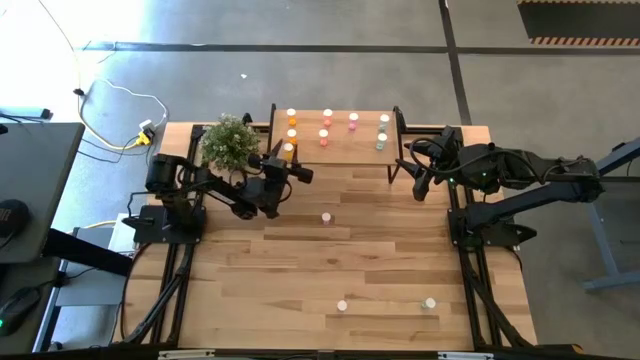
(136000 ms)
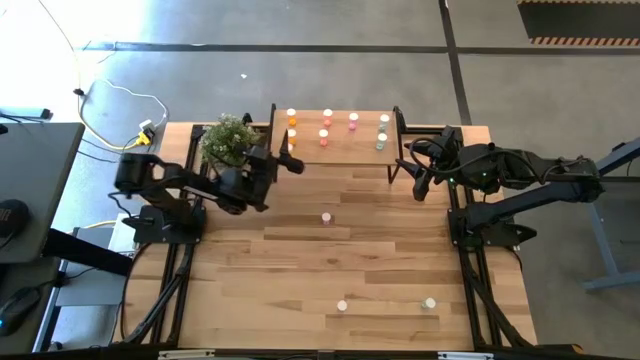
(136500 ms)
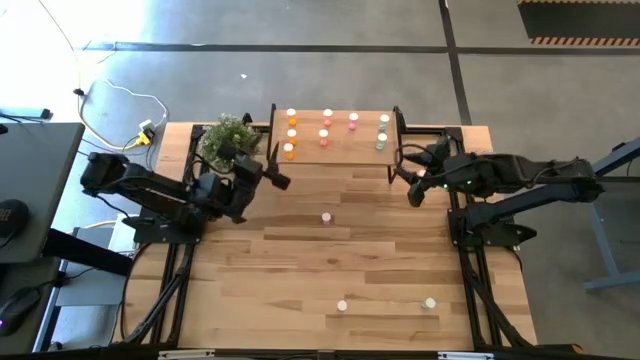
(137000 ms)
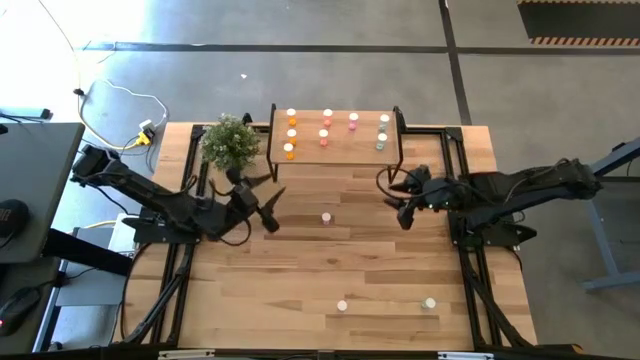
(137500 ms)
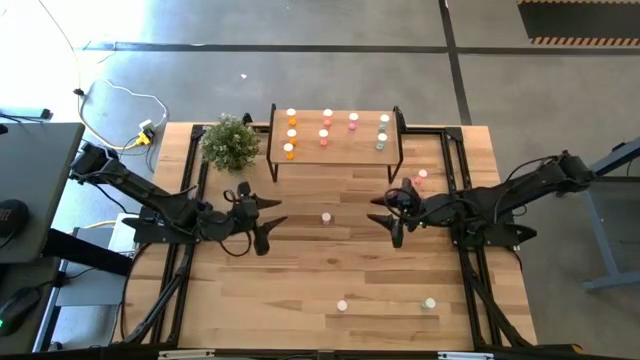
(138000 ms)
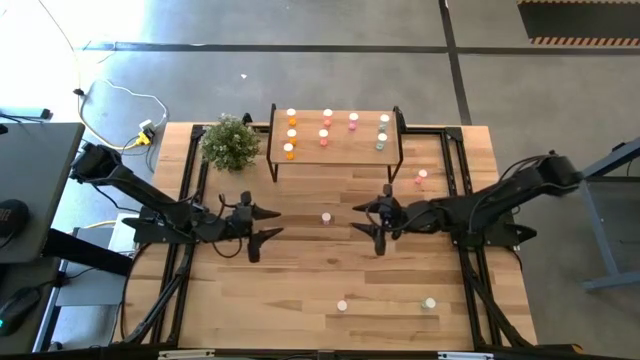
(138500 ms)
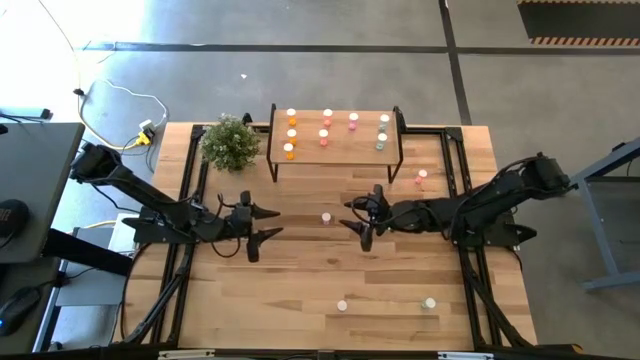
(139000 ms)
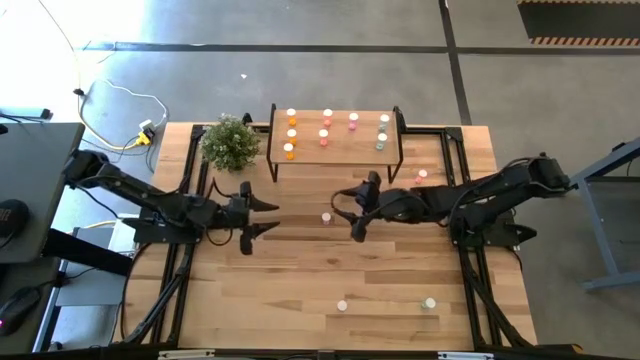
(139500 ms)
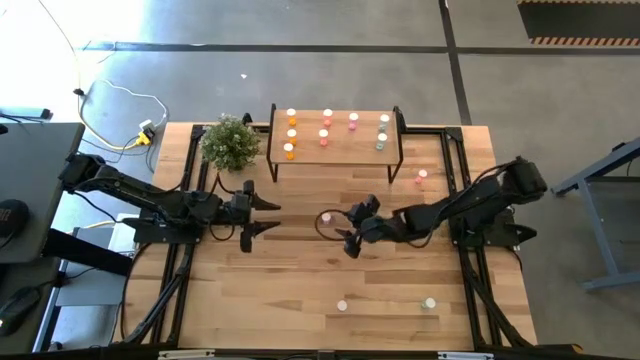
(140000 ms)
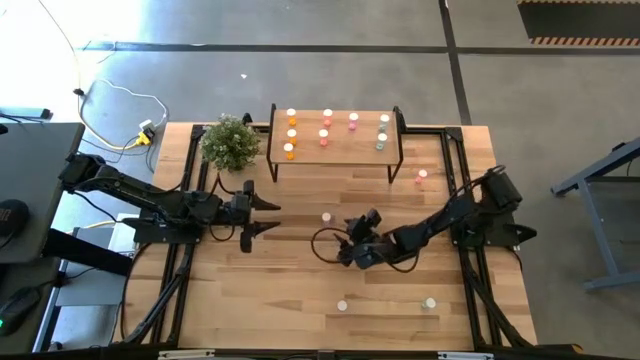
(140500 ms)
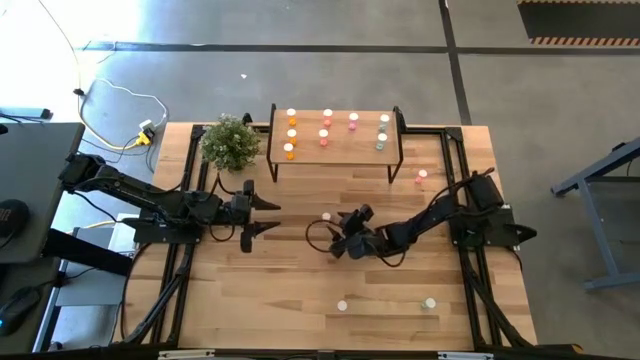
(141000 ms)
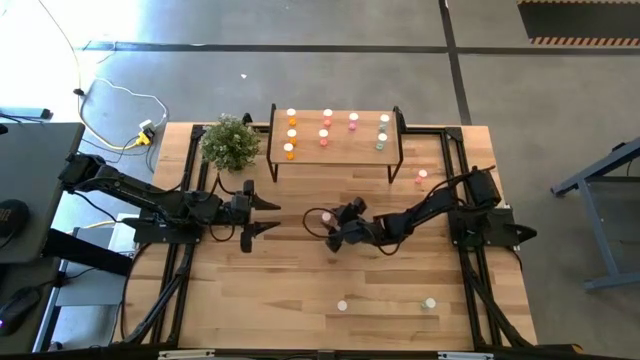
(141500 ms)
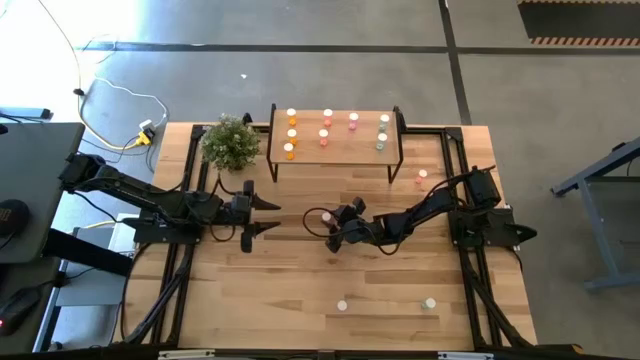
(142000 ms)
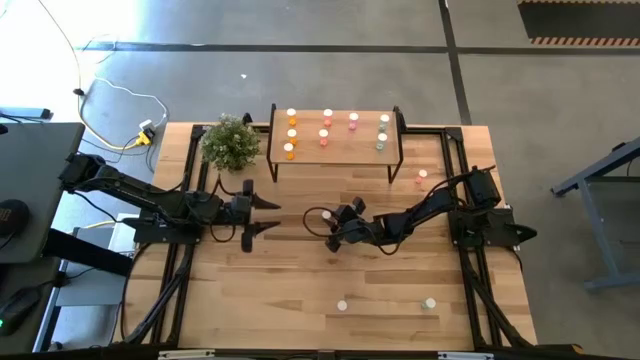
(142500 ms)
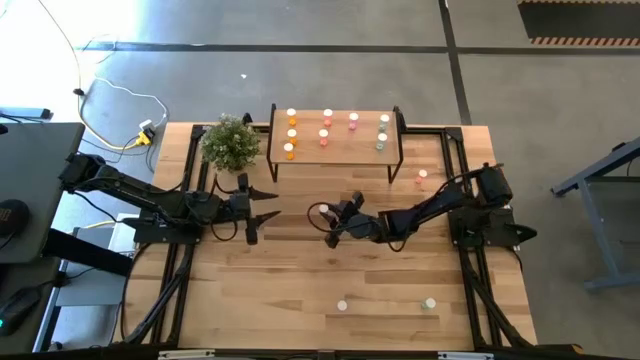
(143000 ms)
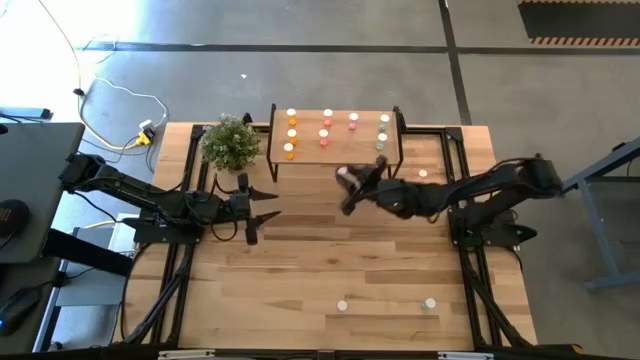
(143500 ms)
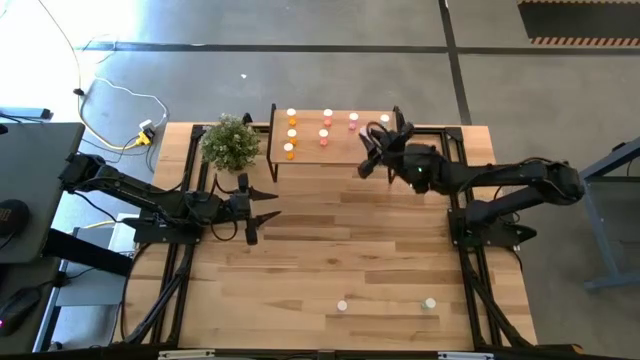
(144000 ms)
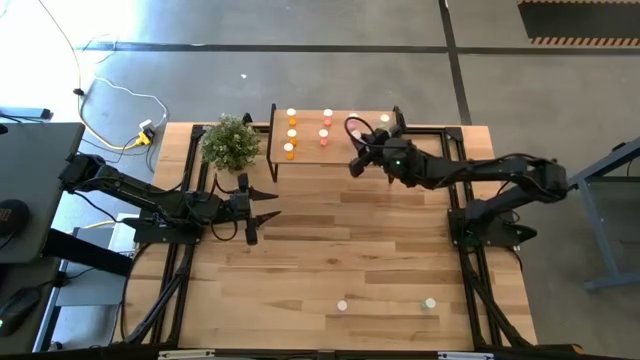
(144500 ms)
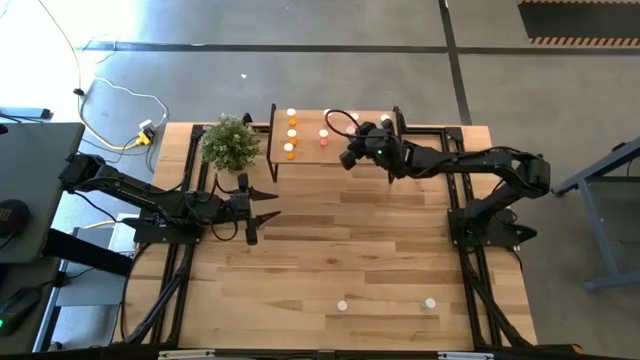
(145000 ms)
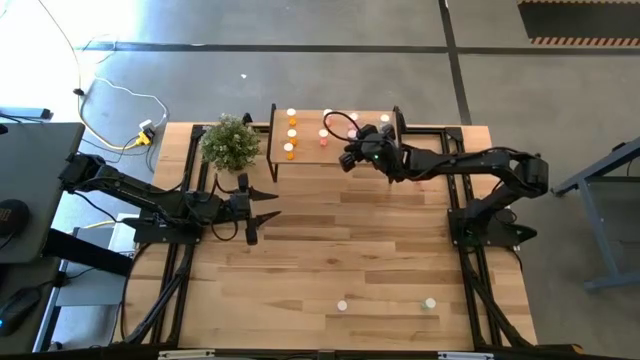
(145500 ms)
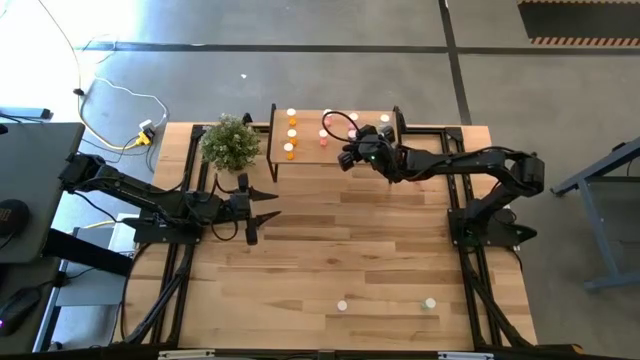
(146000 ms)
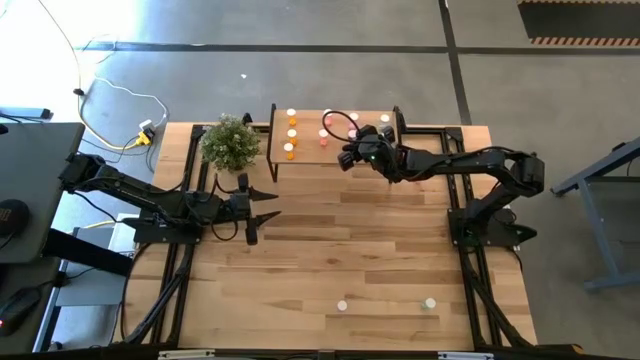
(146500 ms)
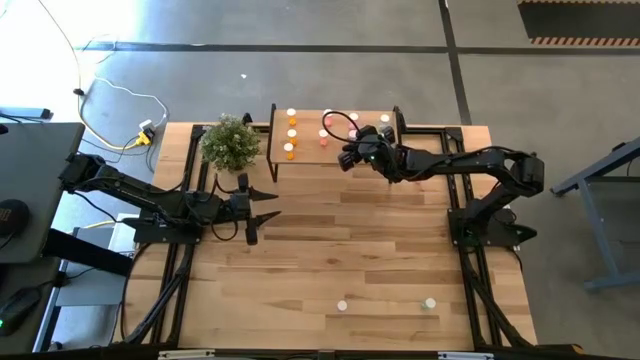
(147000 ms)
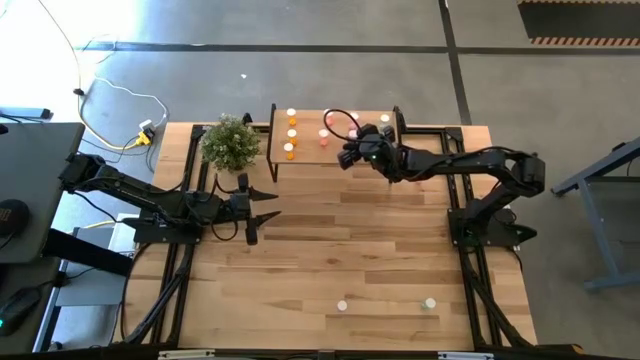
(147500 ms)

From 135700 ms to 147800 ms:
Task: Pick and place medicine bottles onto shelf by color
Put the top purple pill bottle aligned with the other purple pill bottle on the shelf

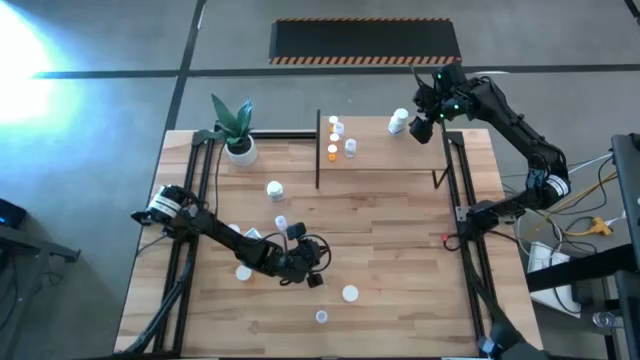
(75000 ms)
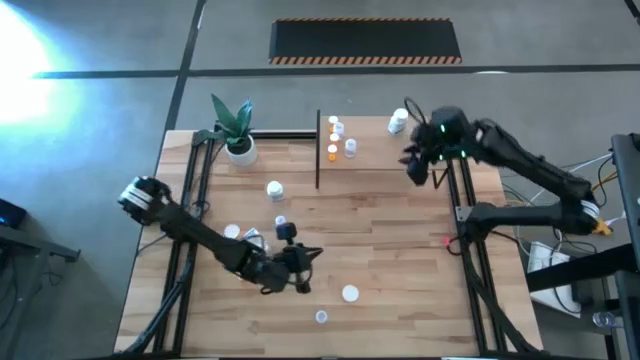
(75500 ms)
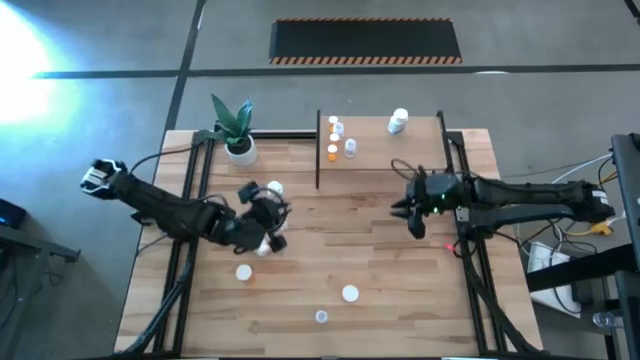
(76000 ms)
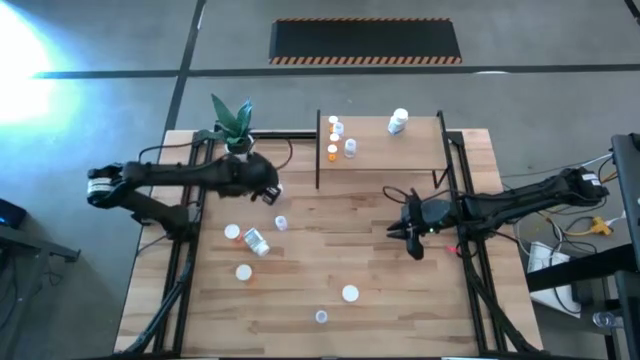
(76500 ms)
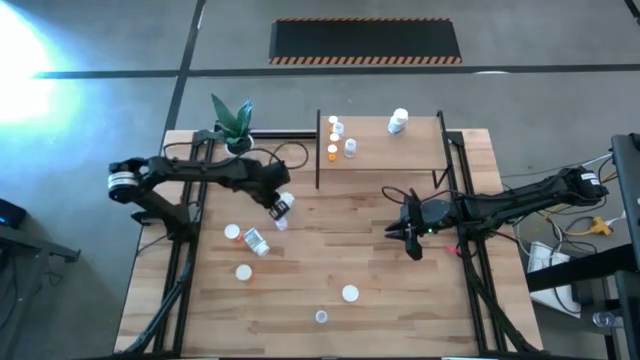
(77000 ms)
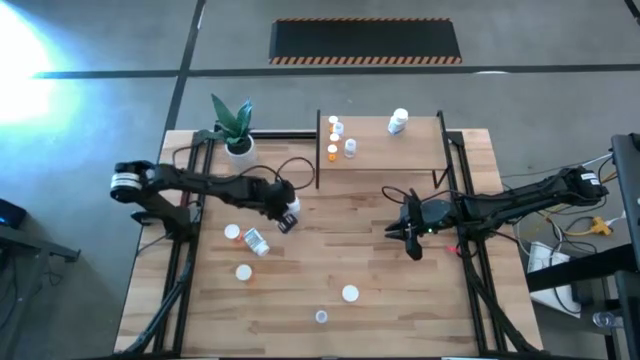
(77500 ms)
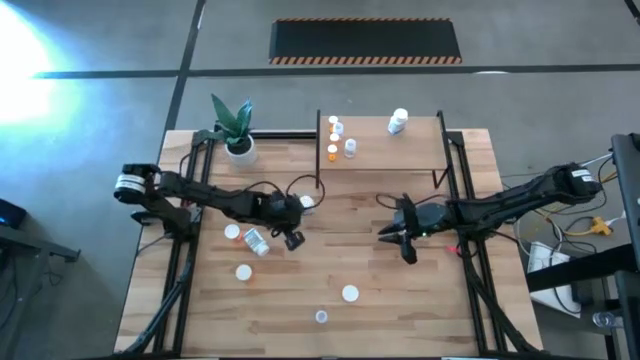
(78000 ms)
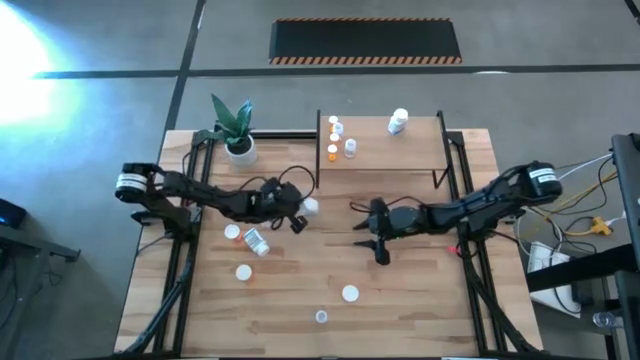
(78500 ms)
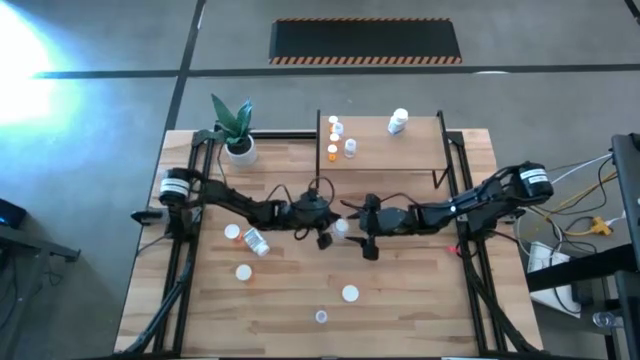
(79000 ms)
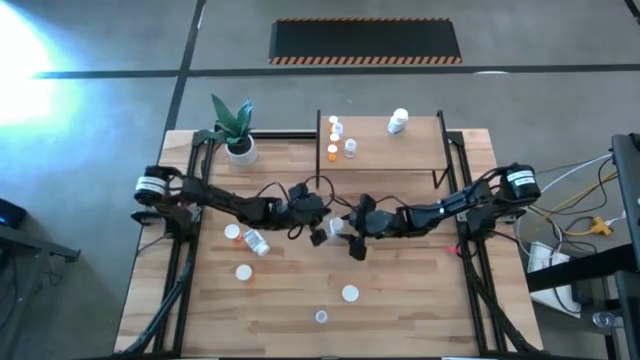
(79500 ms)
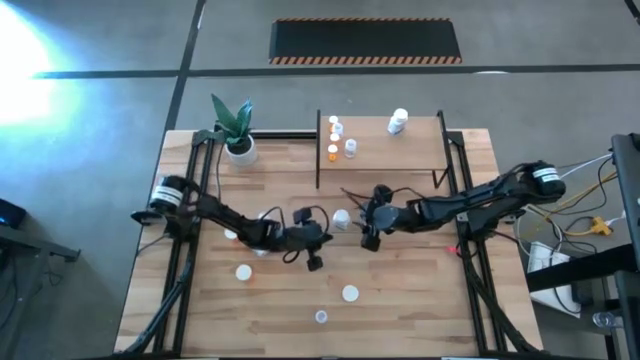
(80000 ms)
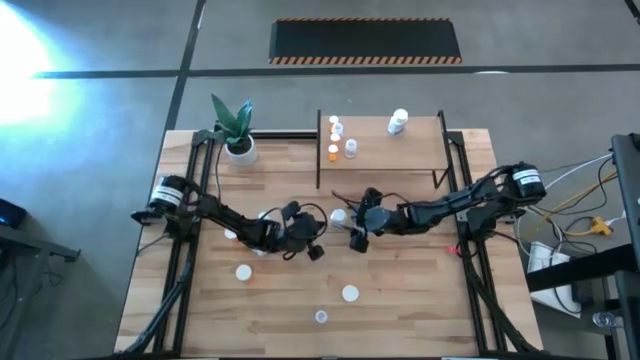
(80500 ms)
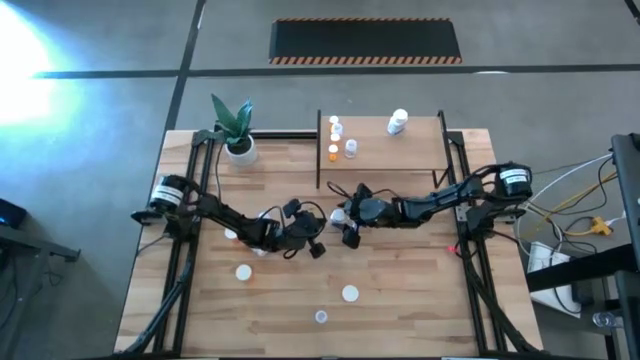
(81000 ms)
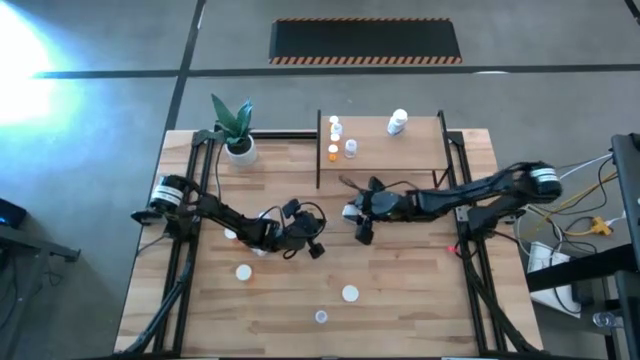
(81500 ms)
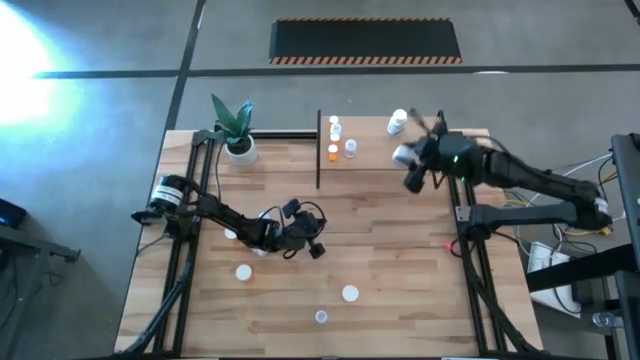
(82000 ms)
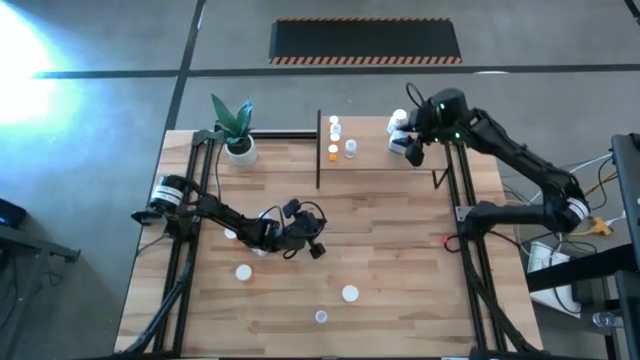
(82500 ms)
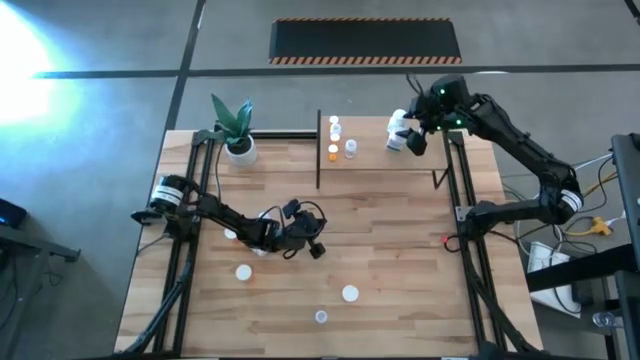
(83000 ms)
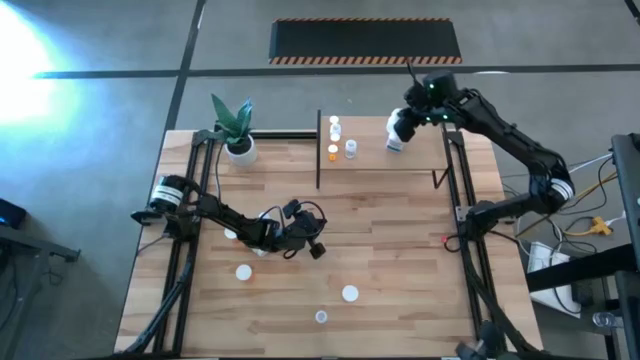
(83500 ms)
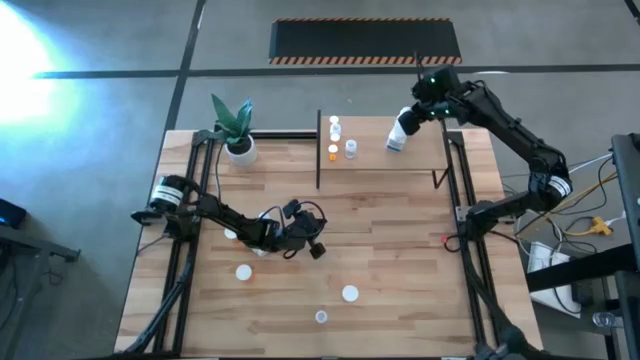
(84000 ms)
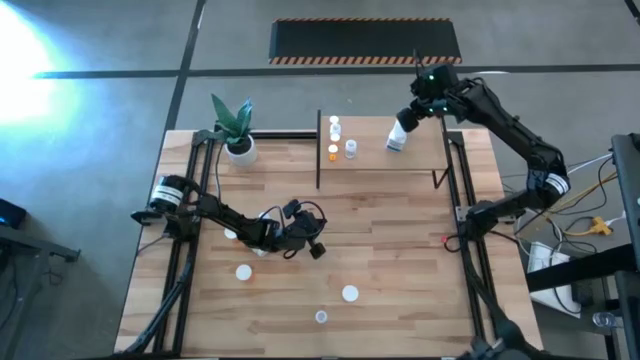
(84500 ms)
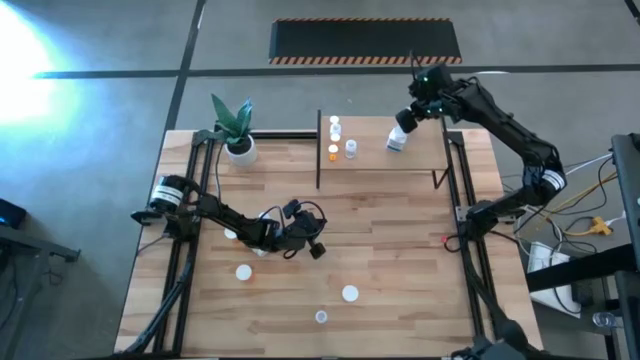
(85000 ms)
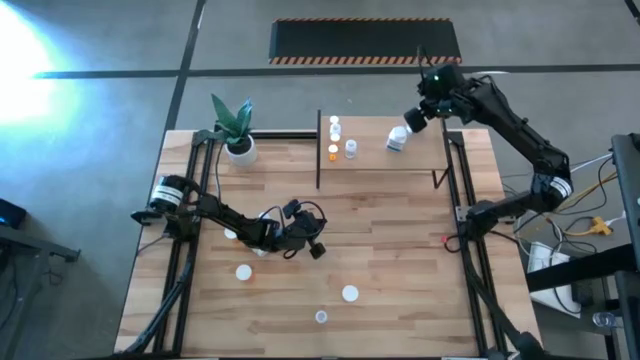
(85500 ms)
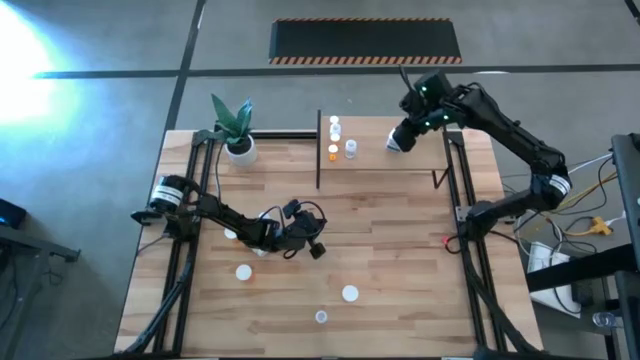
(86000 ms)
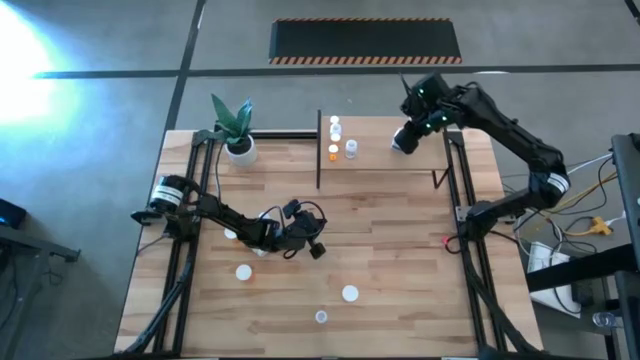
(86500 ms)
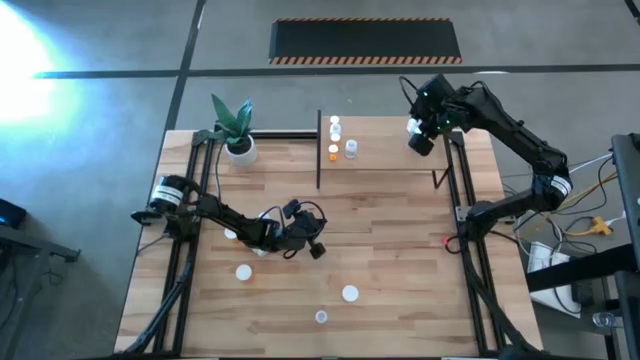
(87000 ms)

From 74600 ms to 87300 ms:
Task: Pick and place medicine bottles onto shelf by color
Put the white pill bottle on the shelf aligned with the other white pill bottle
